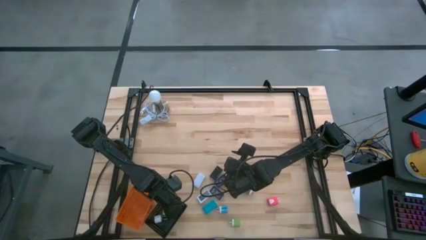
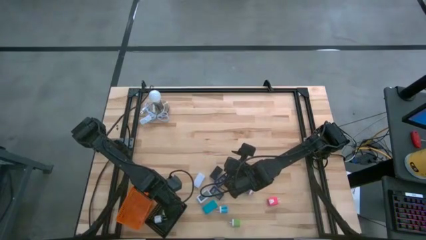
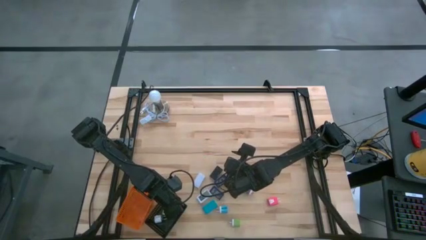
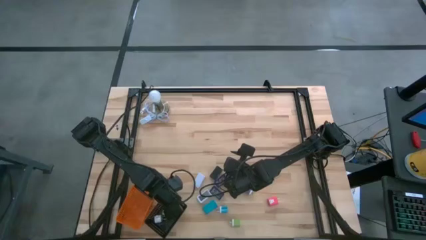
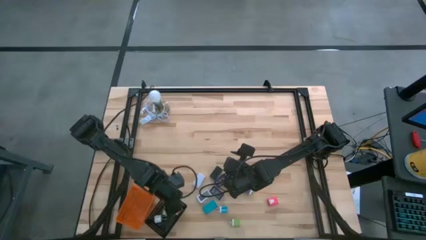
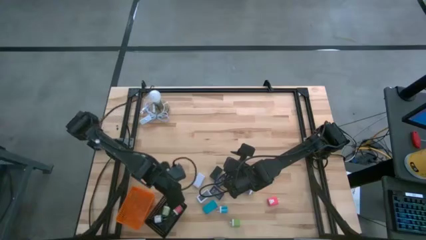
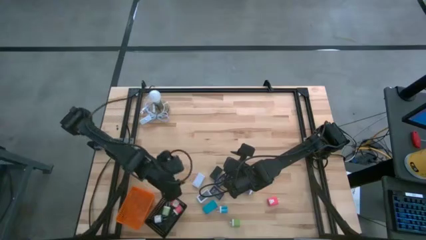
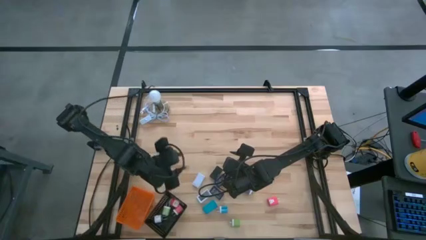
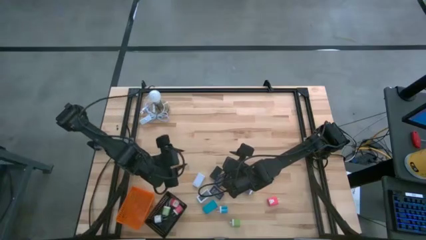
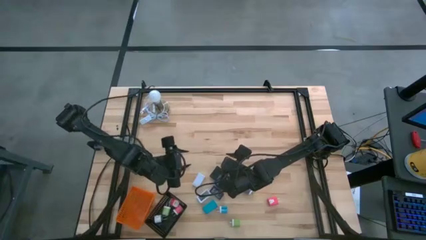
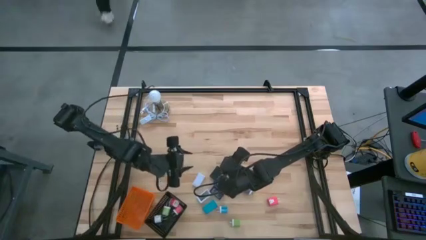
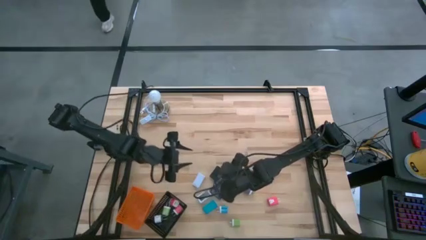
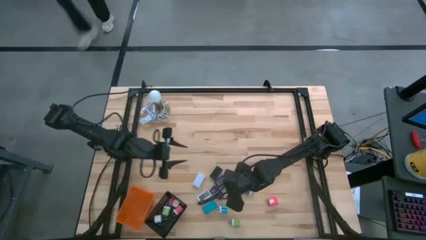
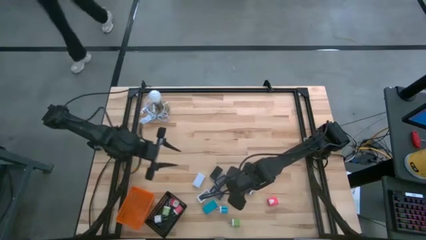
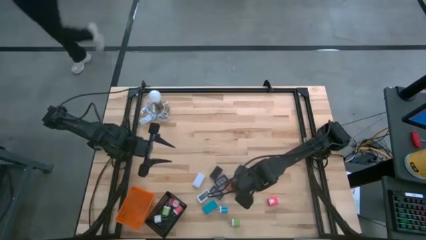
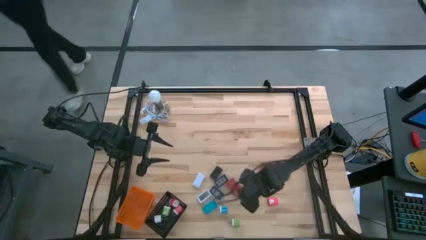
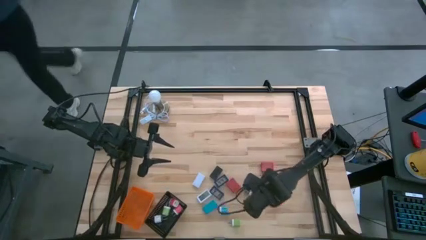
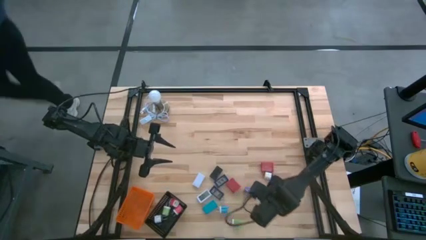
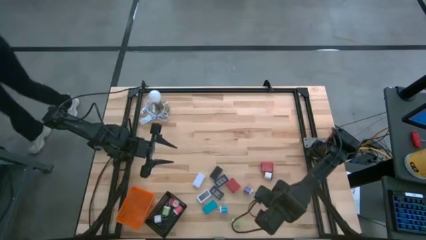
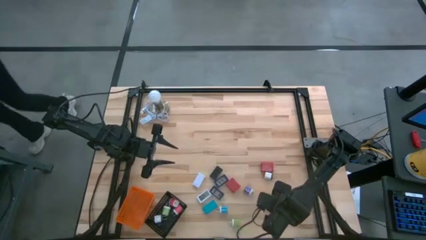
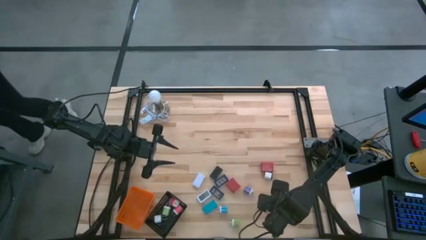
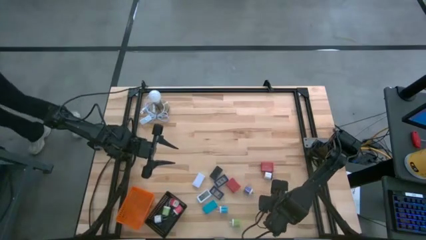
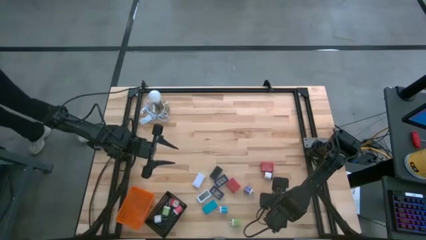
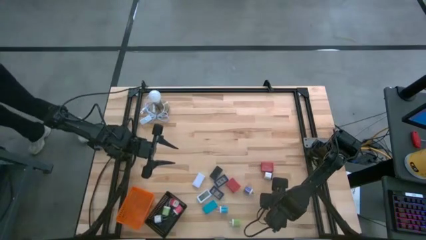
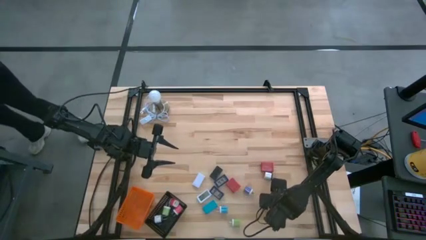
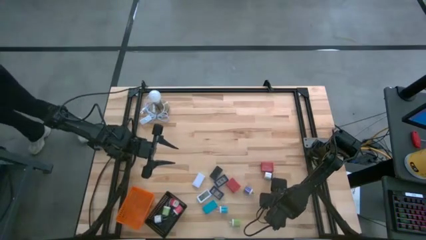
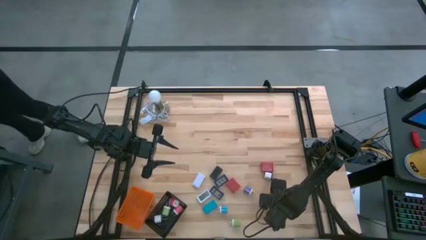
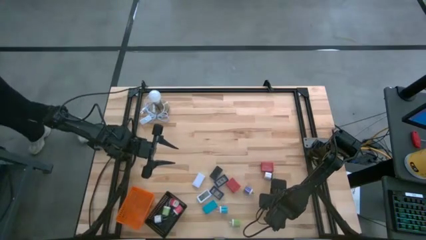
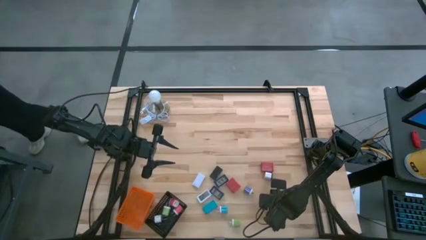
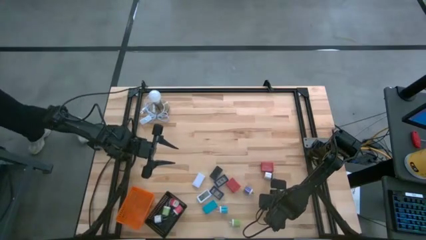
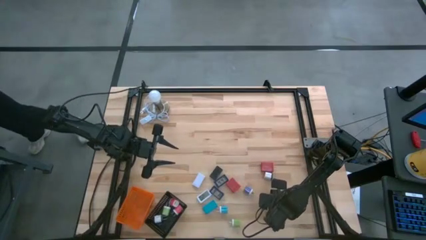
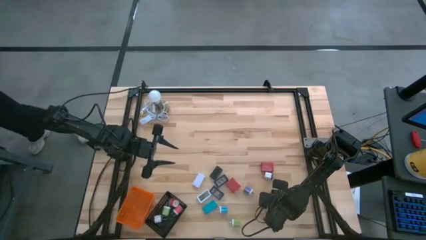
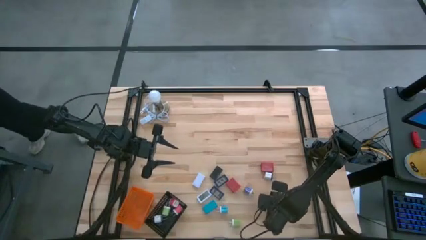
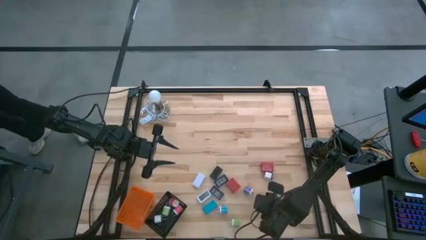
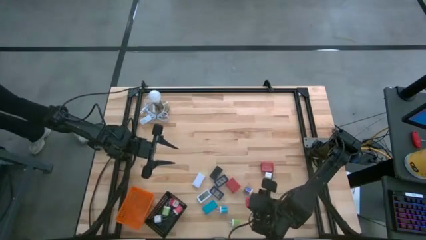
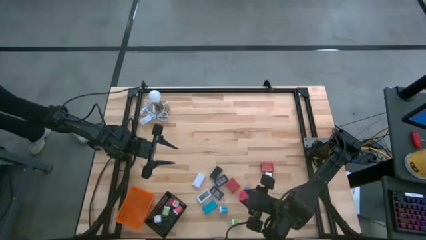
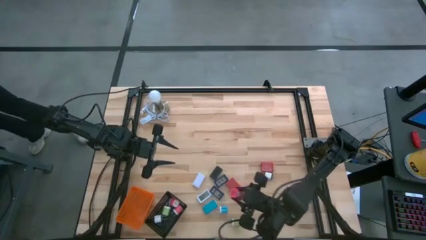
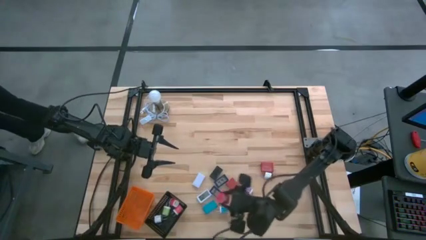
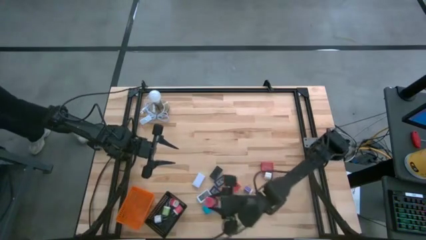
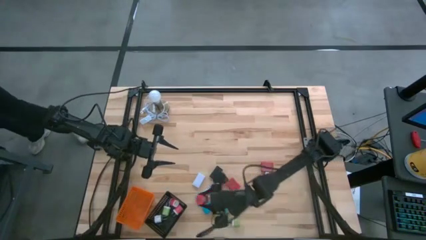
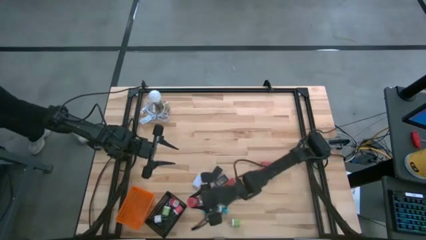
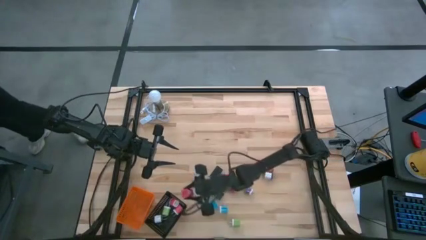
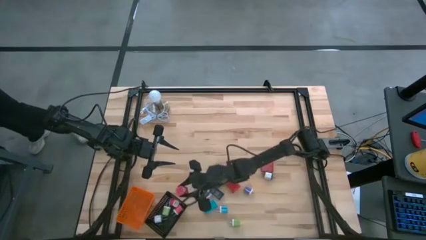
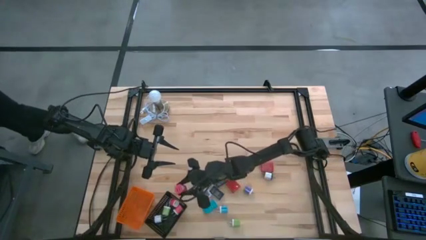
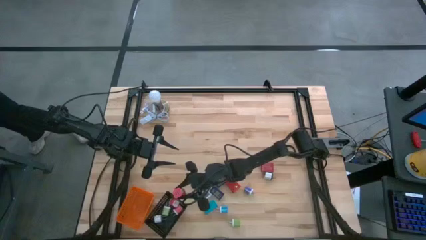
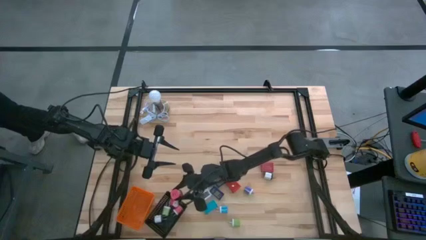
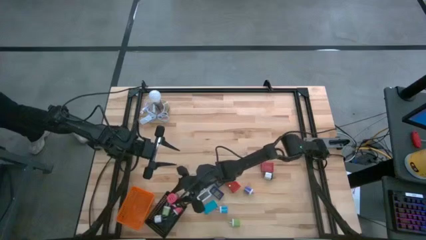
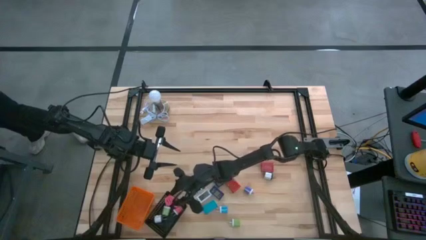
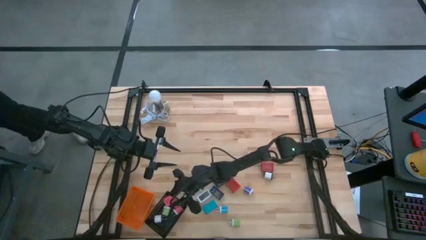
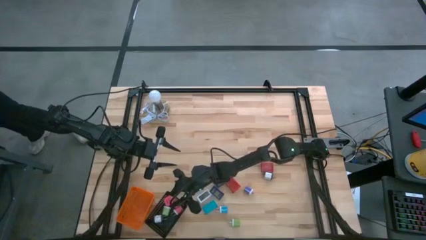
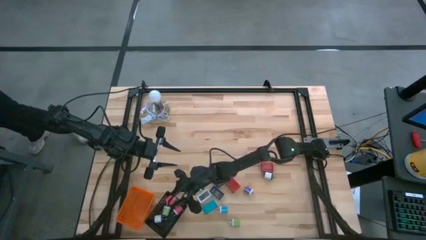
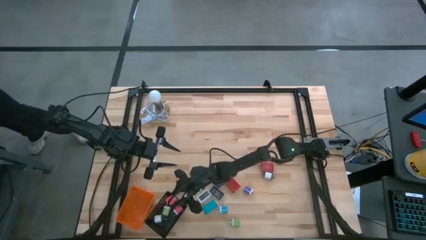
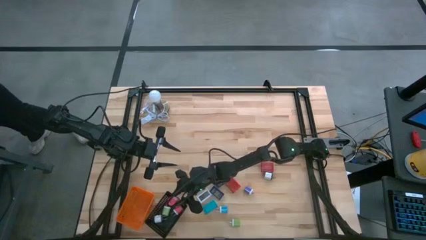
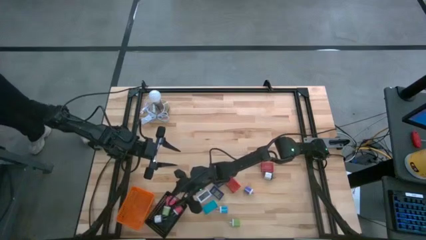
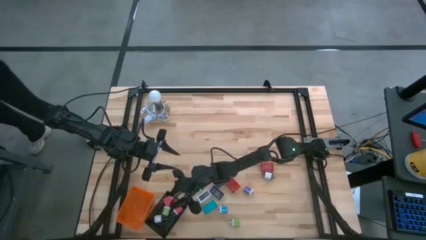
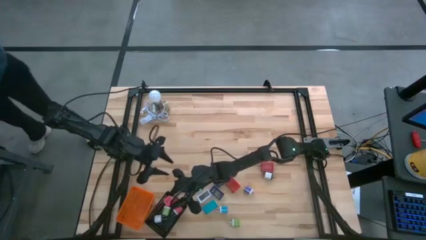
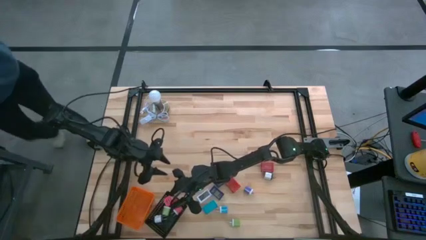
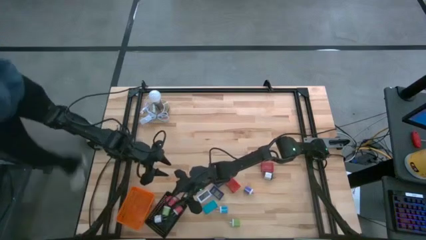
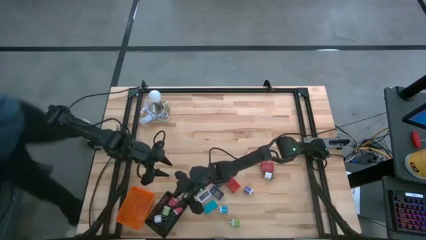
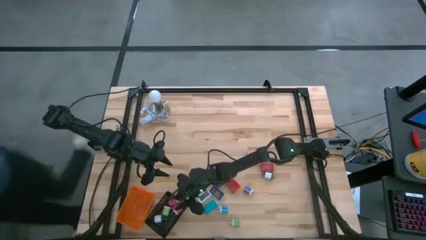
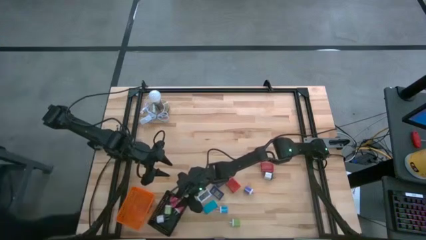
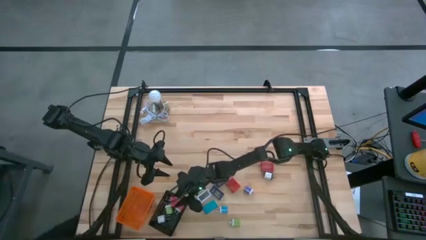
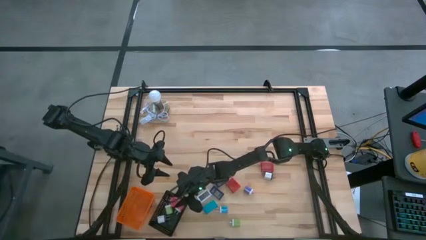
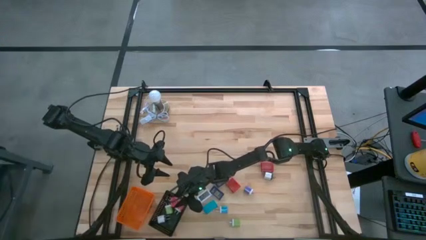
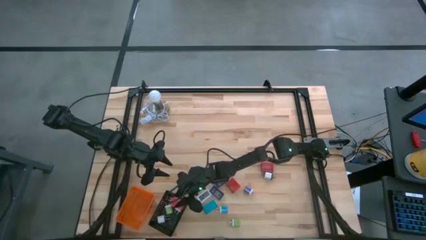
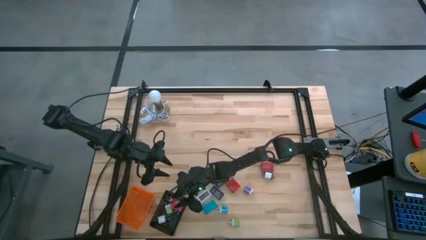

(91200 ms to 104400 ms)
Task: Pick & Place Office items
Put the pink charger adapter into the black basket
